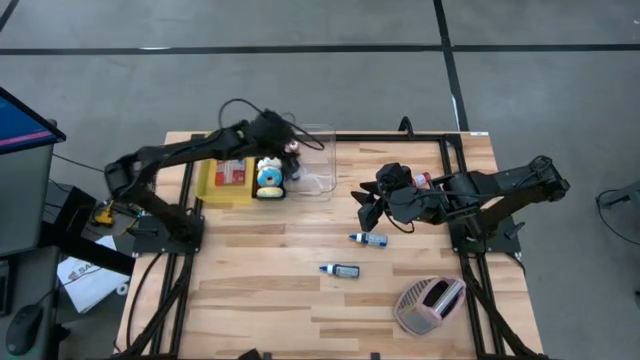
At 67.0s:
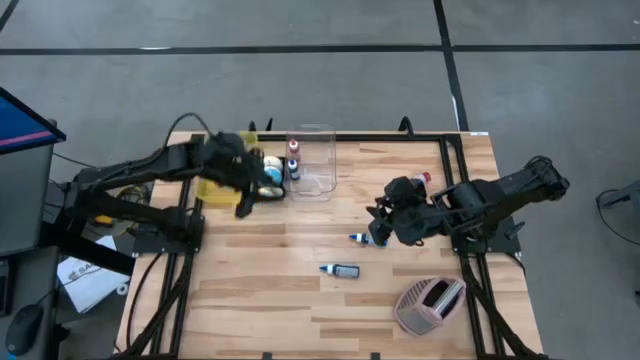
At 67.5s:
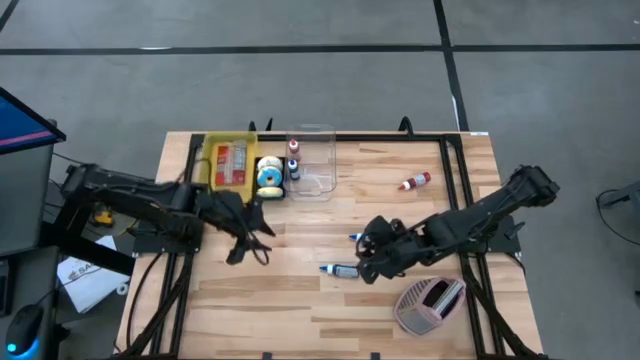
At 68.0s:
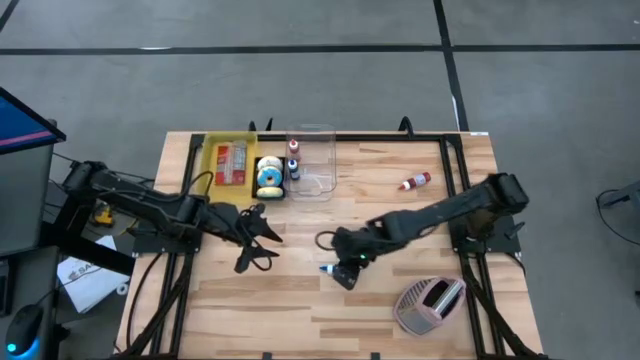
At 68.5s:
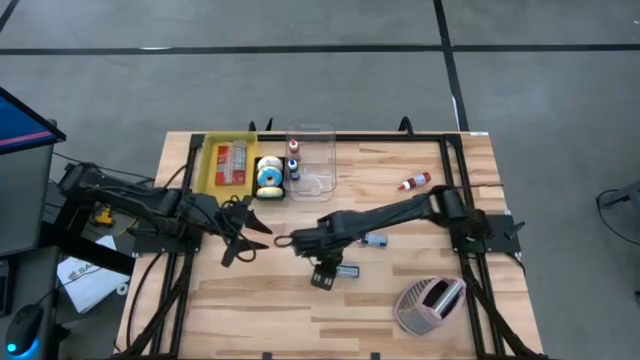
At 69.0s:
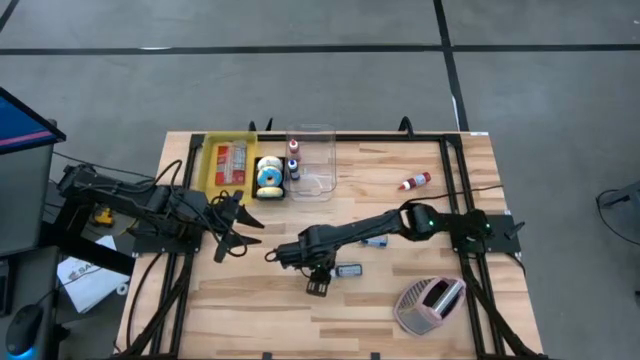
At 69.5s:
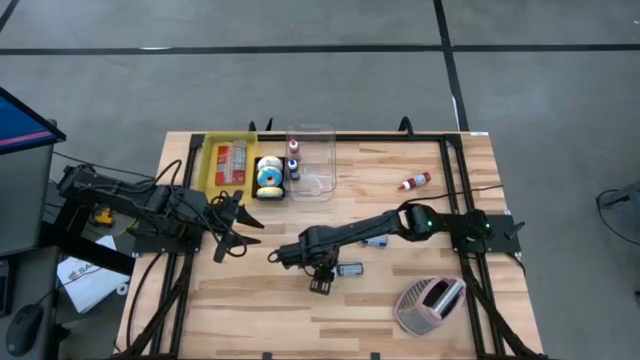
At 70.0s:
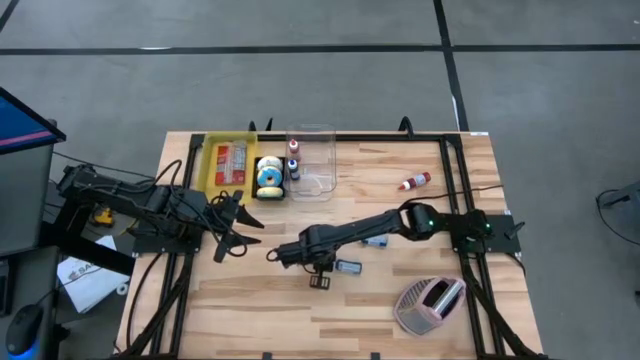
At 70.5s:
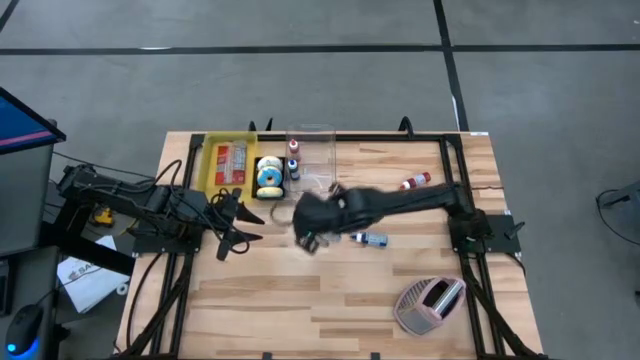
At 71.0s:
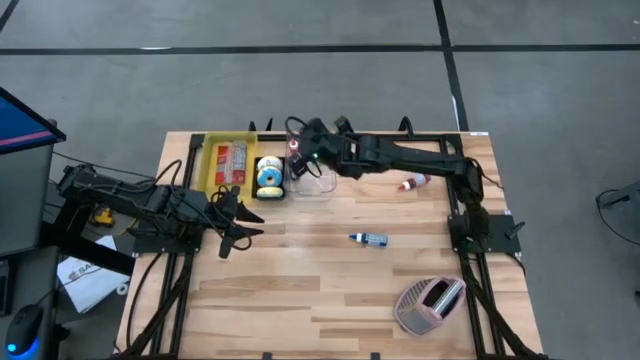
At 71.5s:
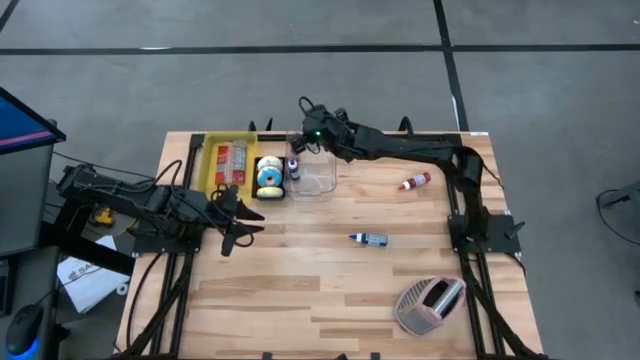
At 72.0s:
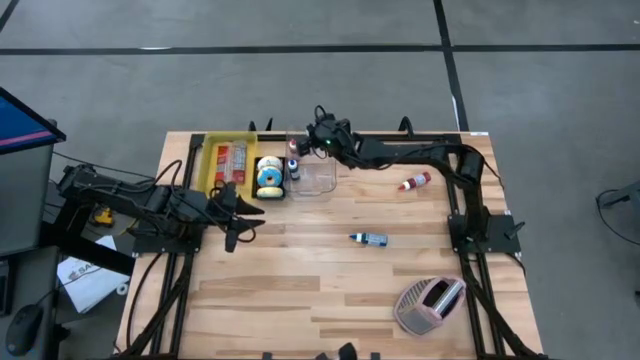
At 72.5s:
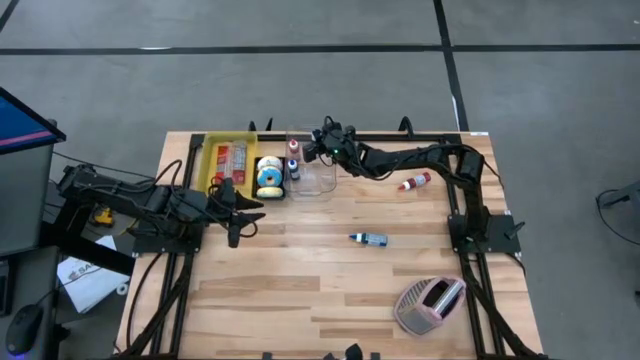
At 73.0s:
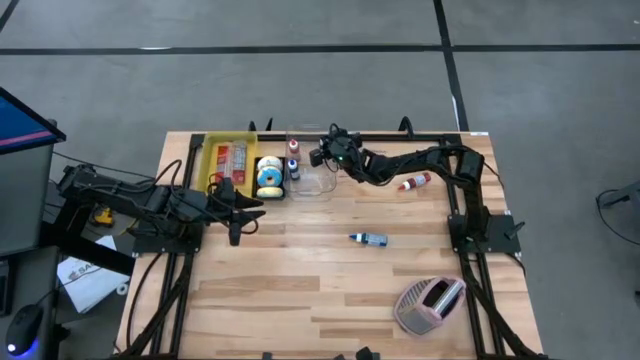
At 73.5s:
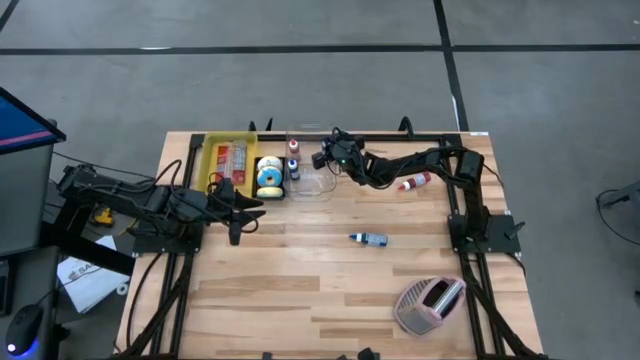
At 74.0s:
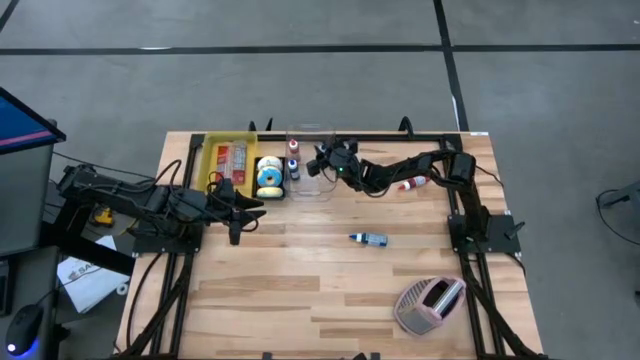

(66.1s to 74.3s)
Put the bottom blue food coloring bottle into the transparent bin

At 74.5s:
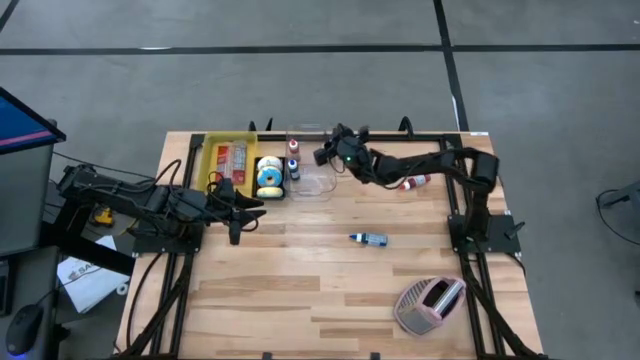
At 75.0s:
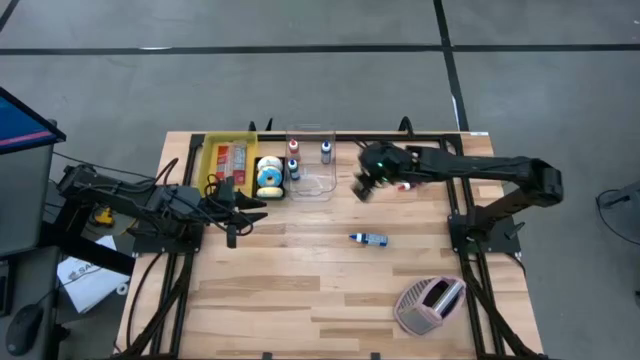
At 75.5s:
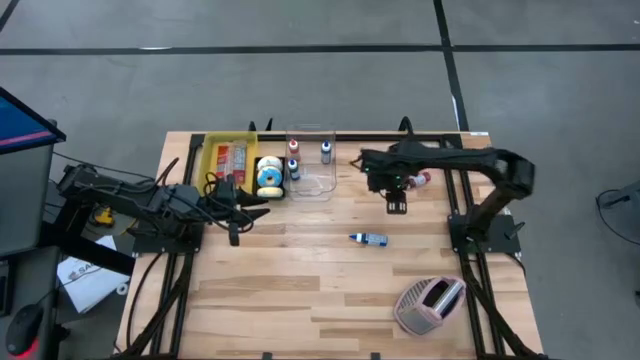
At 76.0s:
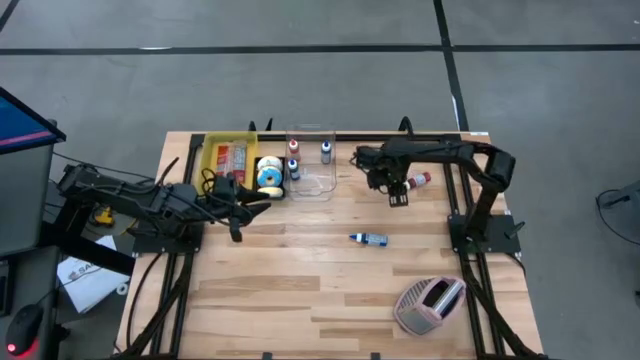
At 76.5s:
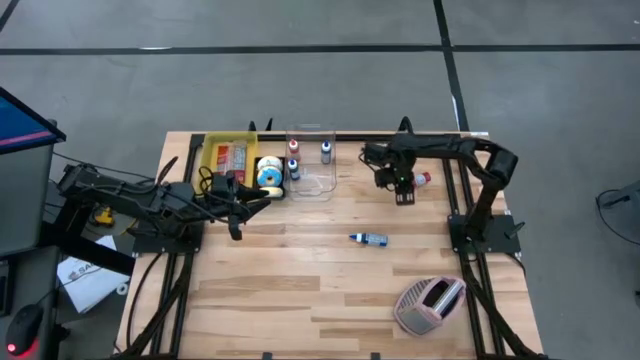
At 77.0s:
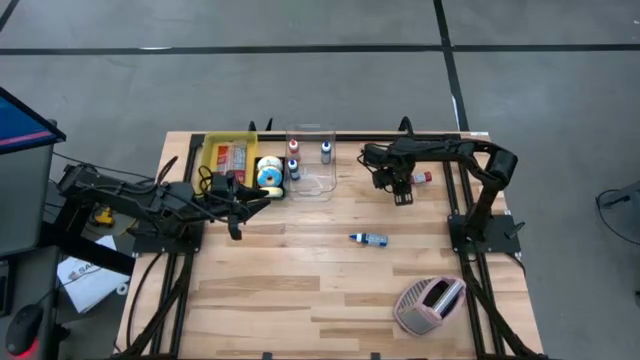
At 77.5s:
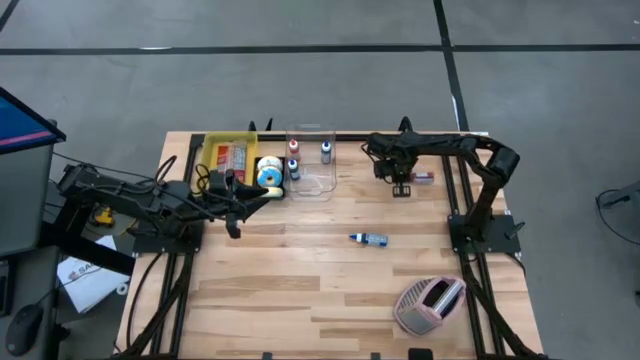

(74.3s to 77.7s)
Put the red food coloring bottle into the transparent bin

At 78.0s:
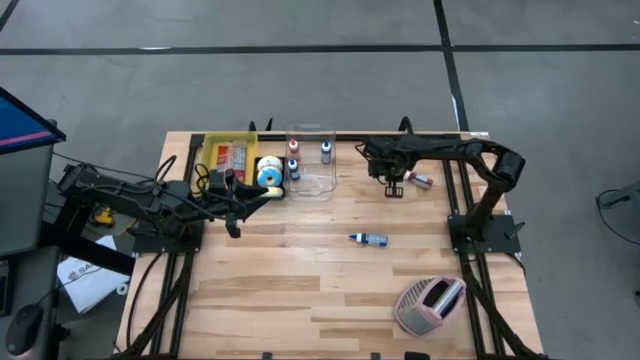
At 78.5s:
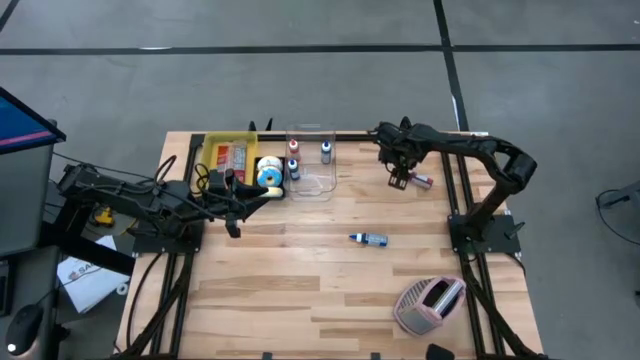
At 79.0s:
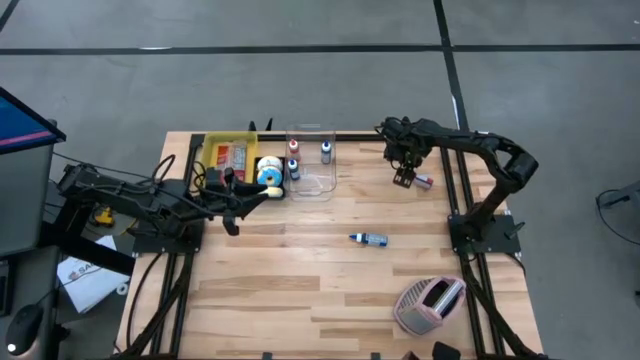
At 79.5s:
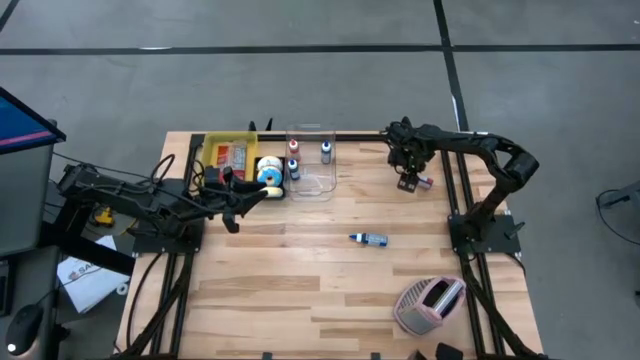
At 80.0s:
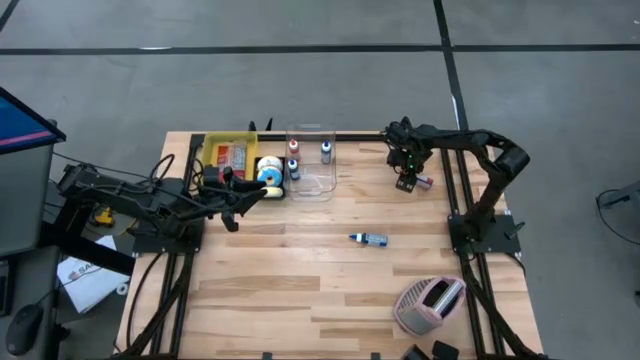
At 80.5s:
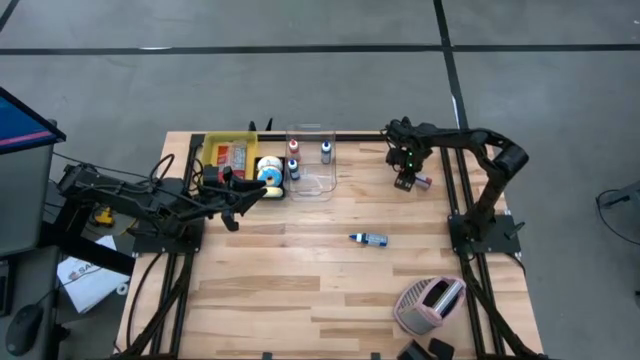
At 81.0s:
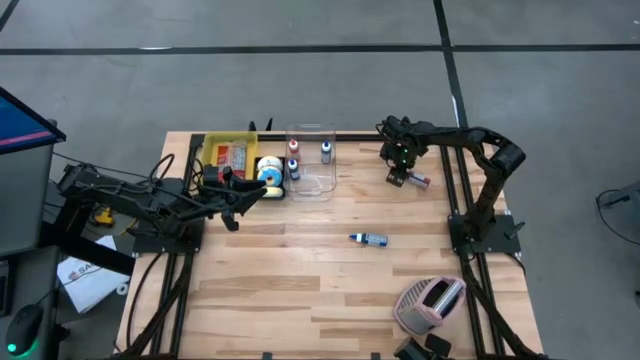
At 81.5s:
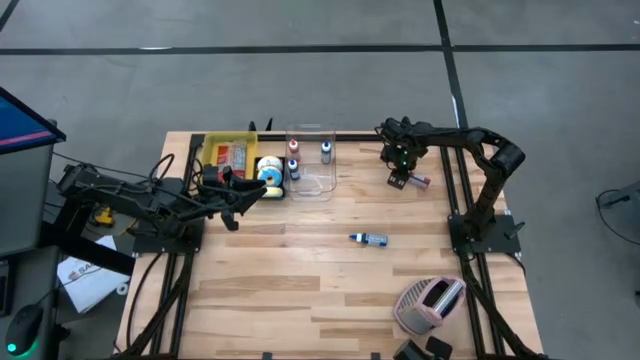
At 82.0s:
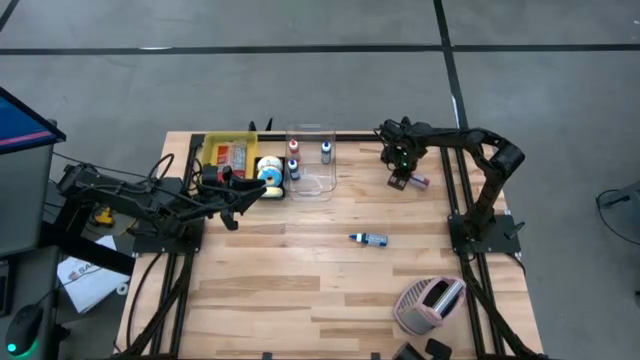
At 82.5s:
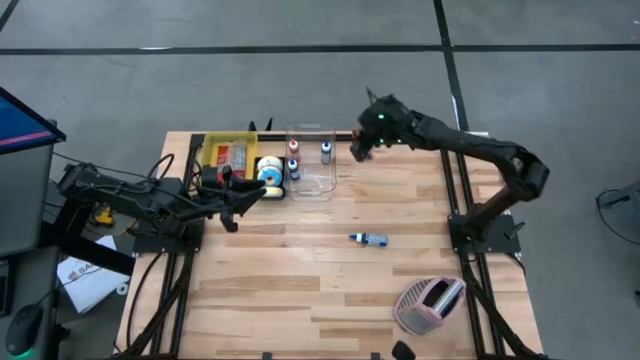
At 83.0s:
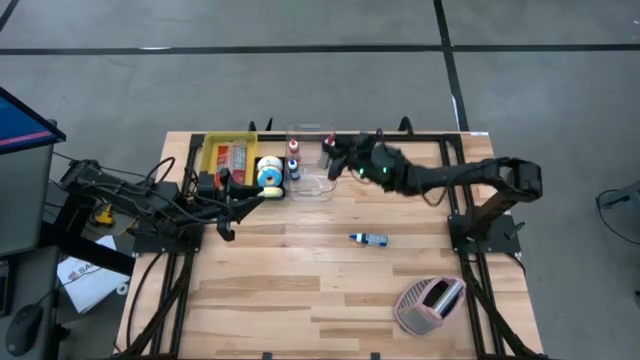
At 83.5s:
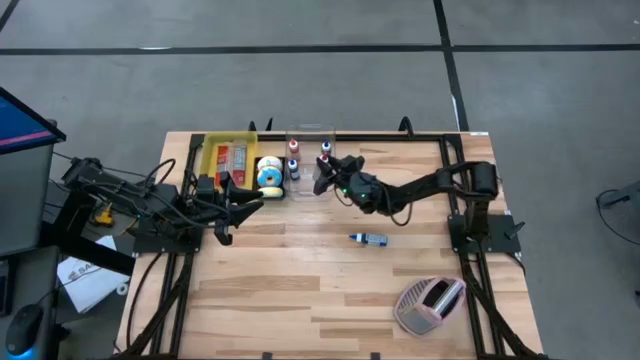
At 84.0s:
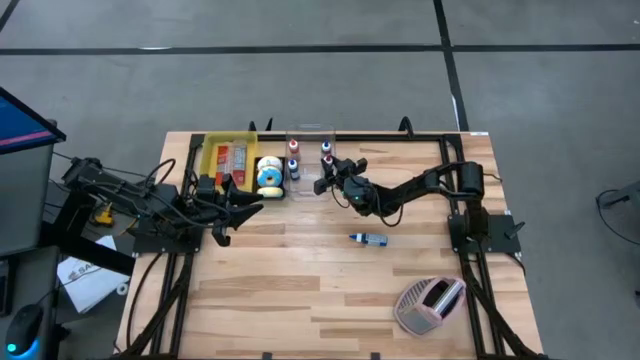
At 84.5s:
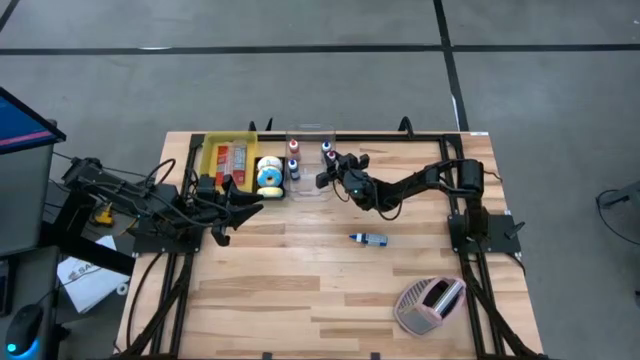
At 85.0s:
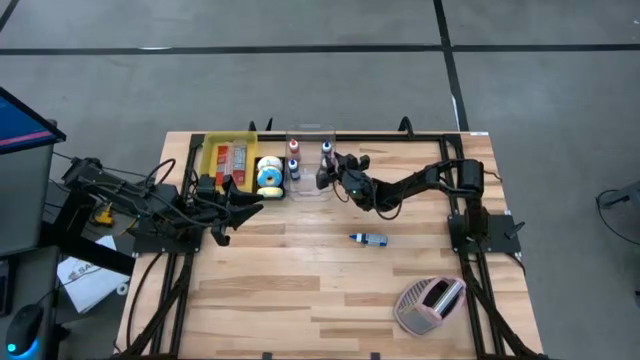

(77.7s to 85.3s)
Put the red food coloring bottle into the transparent bin

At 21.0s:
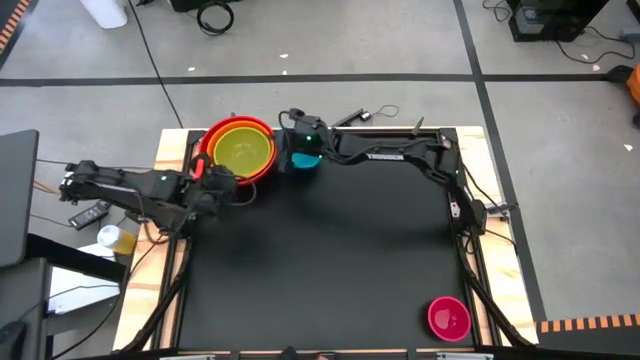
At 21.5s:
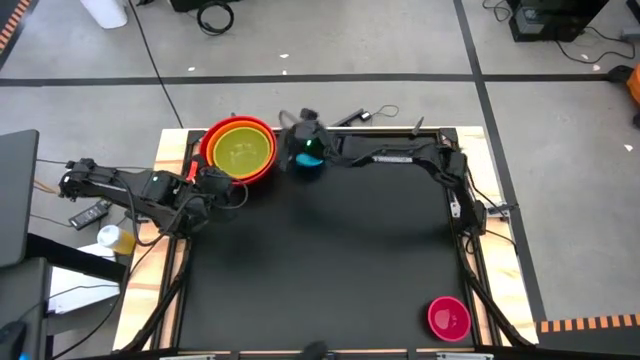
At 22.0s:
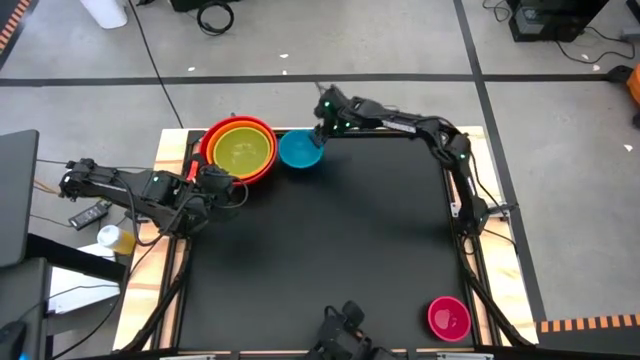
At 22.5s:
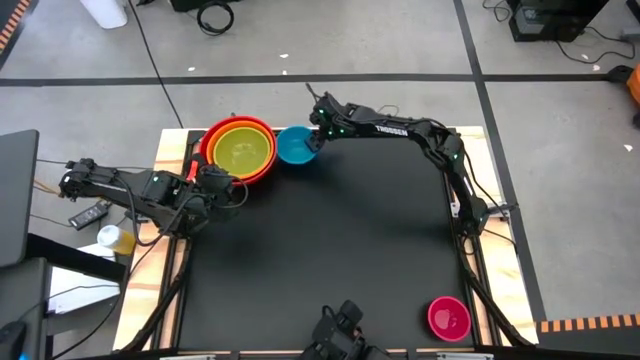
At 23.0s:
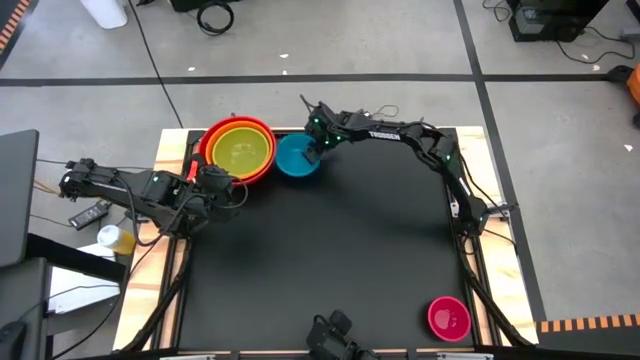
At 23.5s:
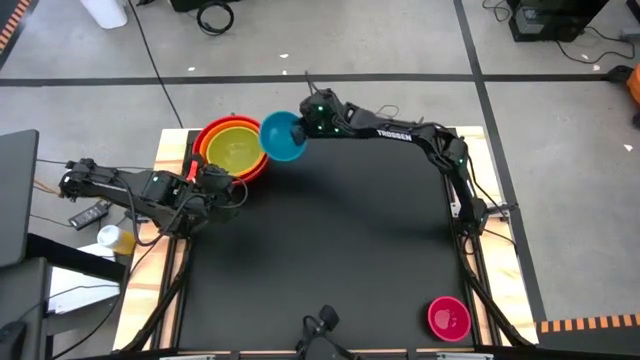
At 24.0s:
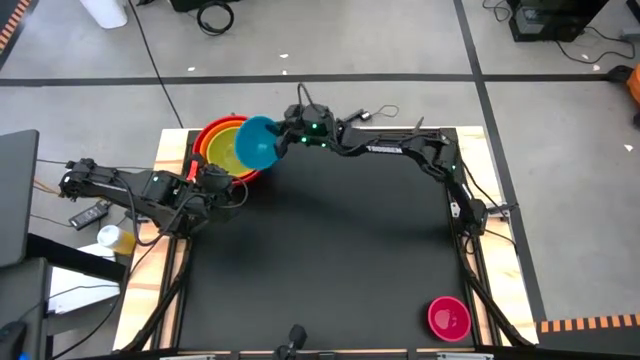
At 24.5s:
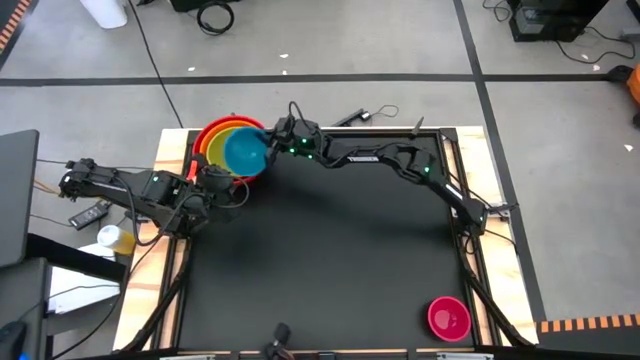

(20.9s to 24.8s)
Stack the blue bowl on top of the green bowl
